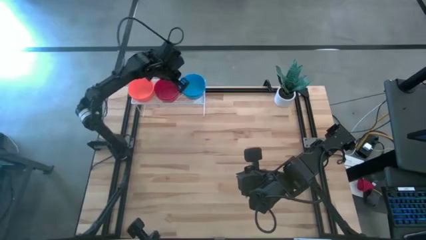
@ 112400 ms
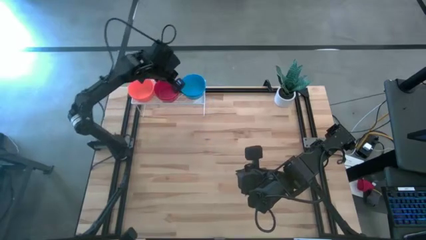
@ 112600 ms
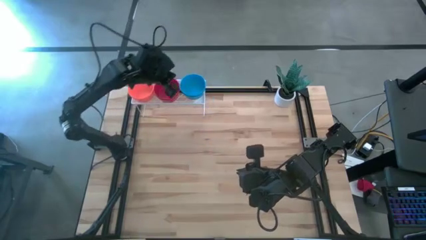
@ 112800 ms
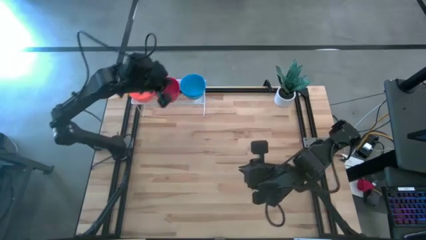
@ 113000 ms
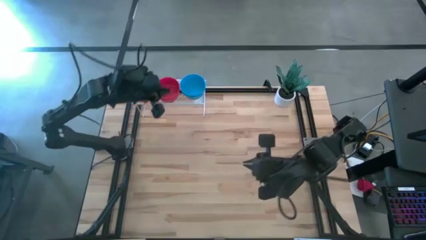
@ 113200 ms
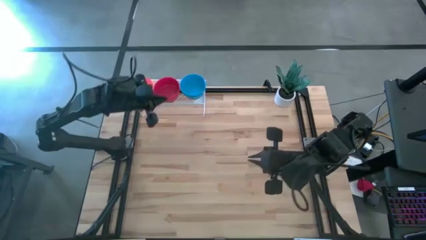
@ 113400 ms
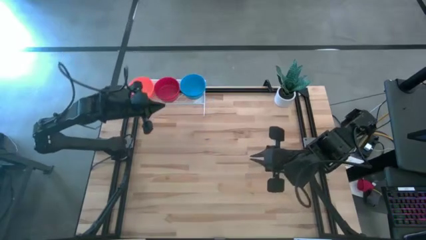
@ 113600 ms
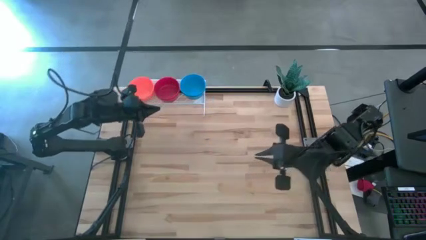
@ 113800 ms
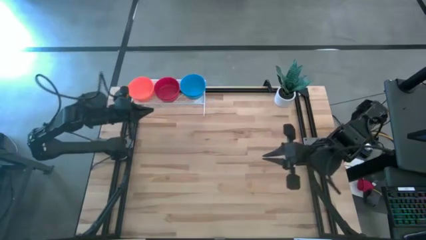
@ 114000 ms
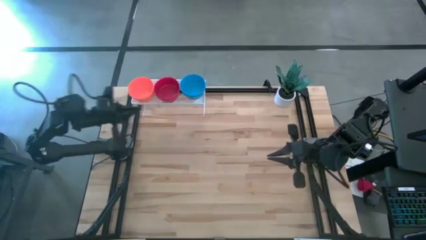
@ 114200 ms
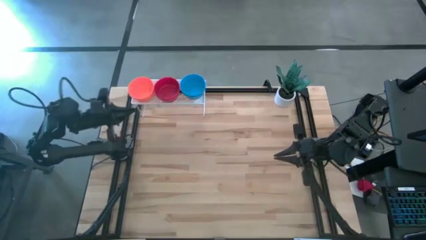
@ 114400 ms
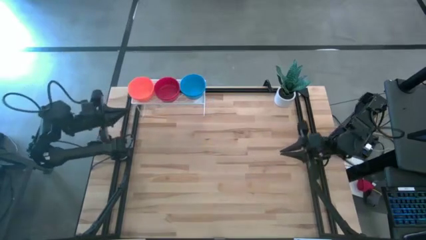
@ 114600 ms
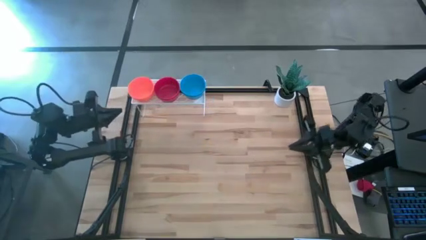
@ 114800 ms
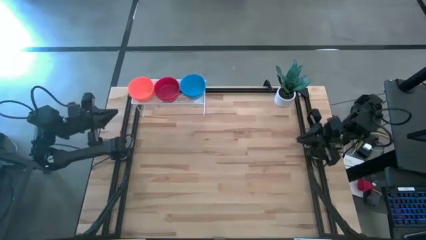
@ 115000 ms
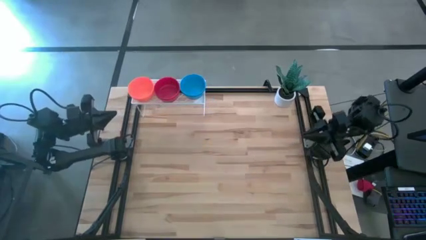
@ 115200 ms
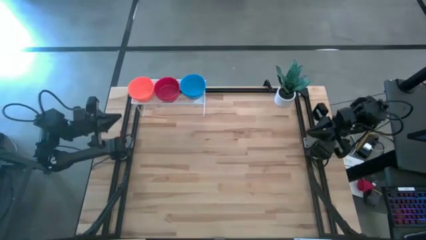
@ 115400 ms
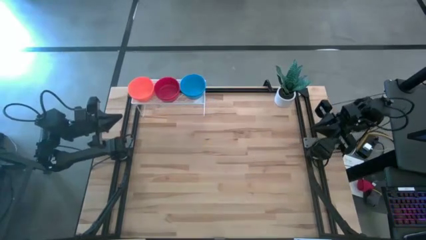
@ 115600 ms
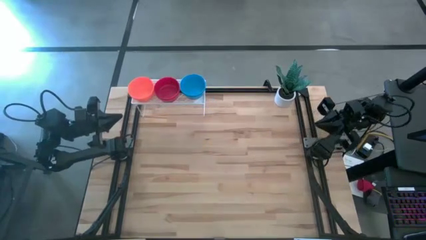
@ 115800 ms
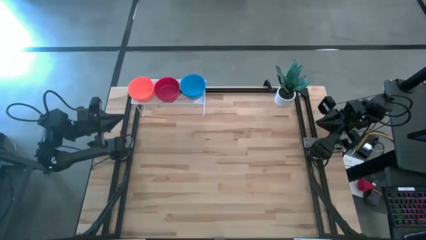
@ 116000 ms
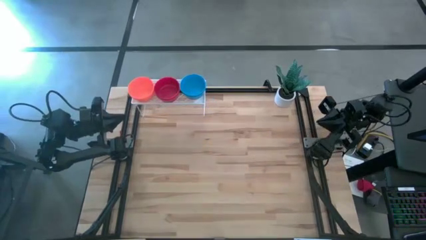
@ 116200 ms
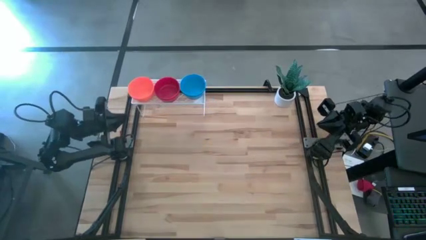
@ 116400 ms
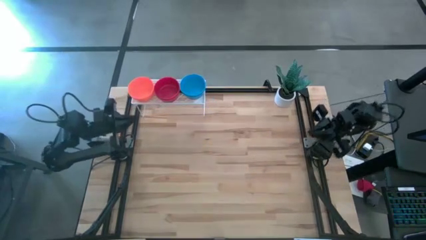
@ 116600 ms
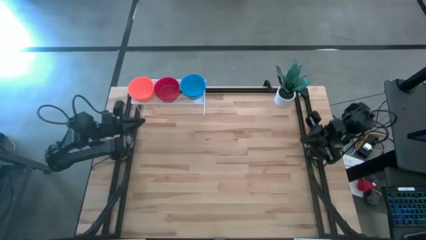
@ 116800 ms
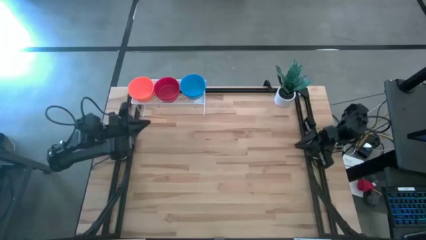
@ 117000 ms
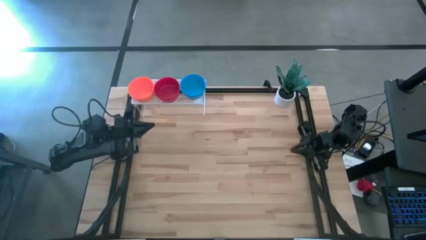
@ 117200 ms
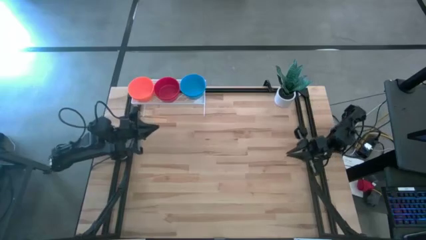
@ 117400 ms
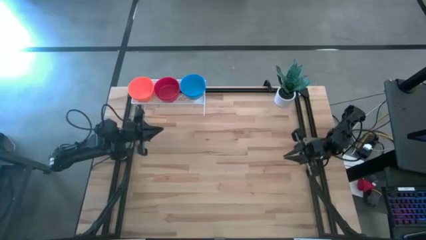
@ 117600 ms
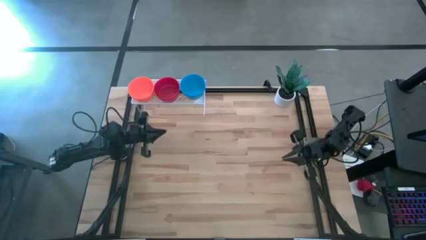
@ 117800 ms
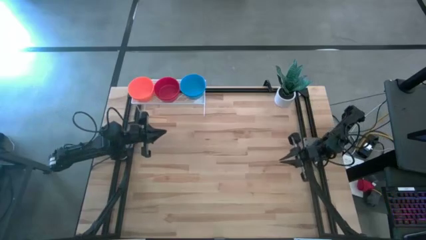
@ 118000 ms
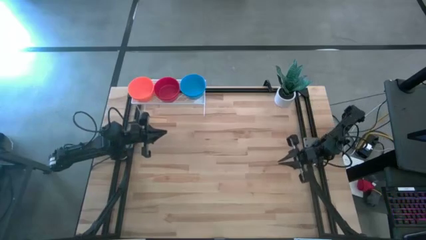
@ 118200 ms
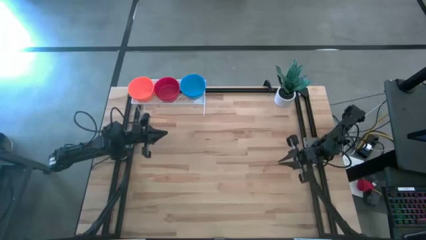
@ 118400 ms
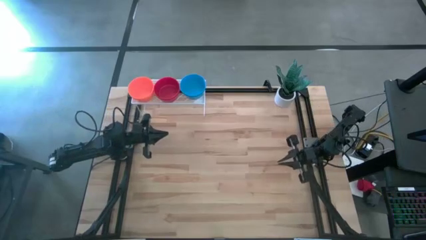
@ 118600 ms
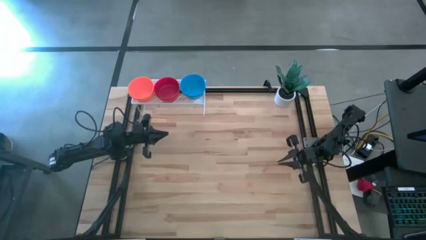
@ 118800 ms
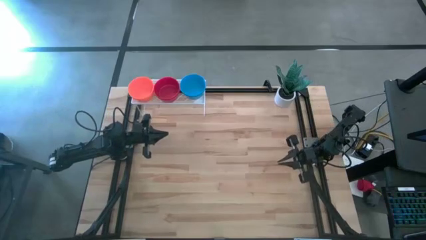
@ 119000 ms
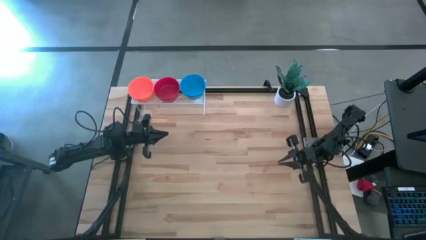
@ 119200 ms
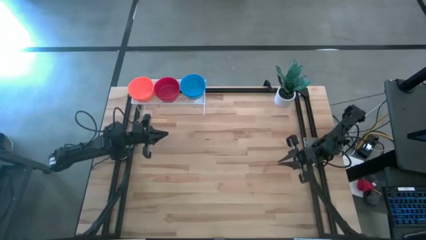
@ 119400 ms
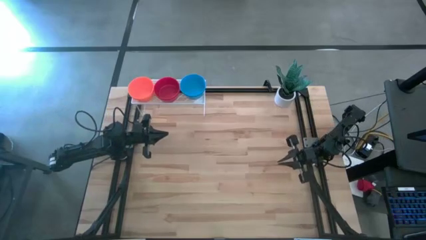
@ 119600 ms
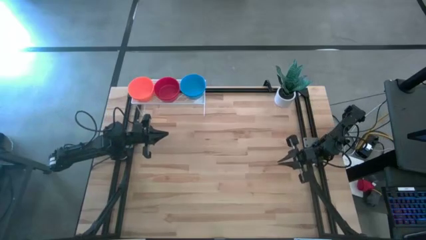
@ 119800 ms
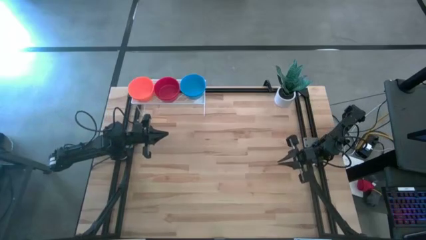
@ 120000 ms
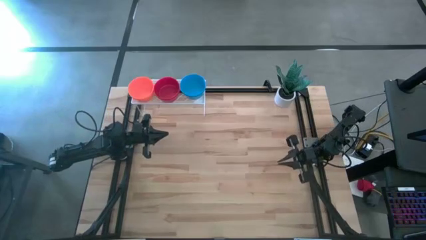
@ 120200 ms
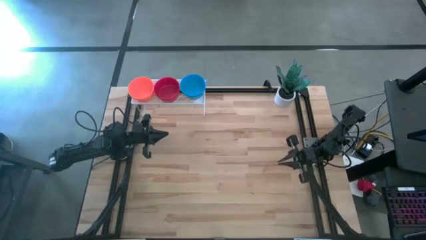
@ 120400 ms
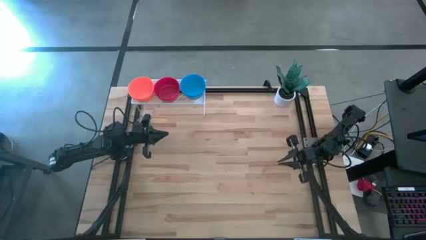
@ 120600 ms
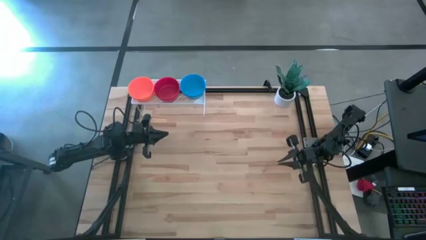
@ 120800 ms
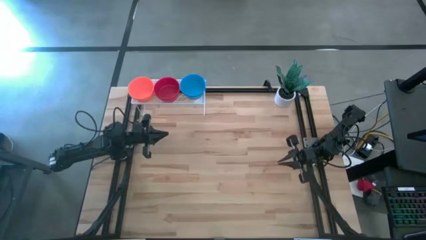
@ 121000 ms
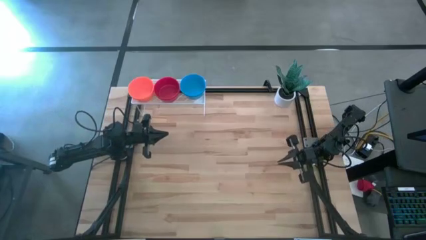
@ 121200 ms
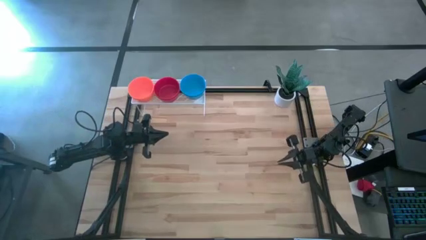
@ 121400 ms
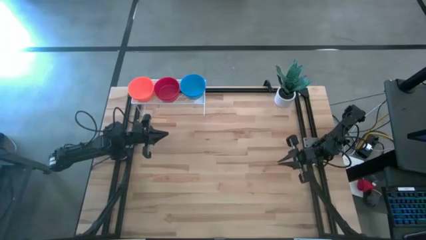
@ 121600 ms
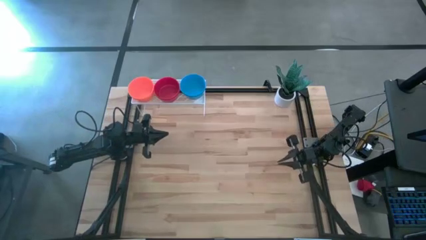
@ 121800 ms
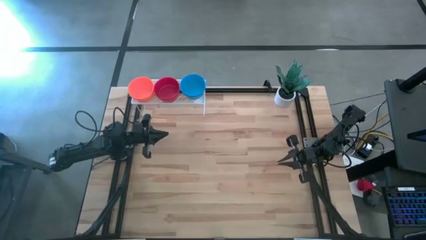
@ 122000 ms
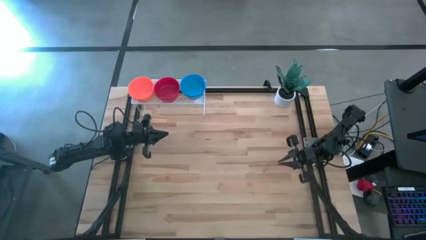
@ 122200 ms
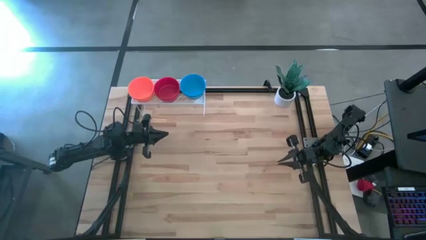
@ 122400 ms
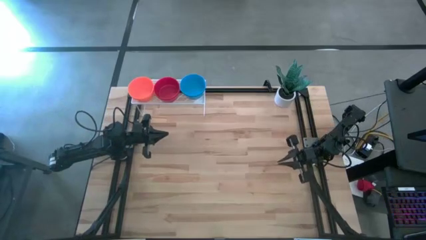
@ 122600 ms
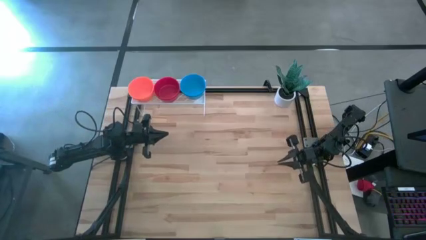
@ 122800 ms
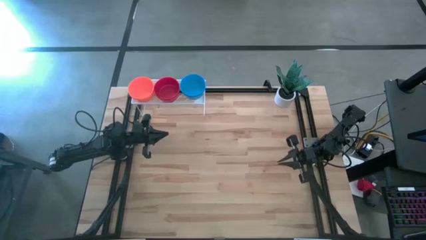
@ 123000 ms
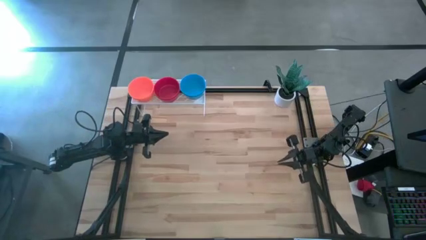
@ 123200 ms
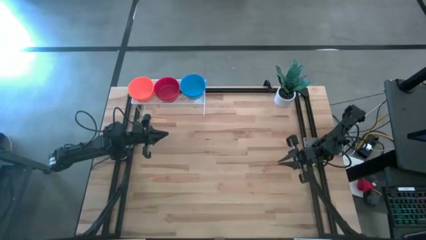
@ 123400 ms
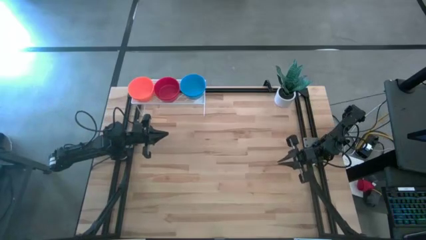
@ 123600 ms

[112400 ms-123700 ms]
Task: Pick & Place Mini bowls
Return to Home Position

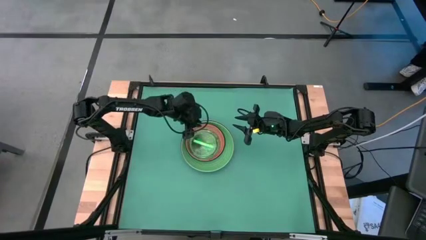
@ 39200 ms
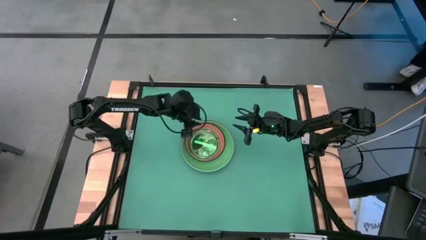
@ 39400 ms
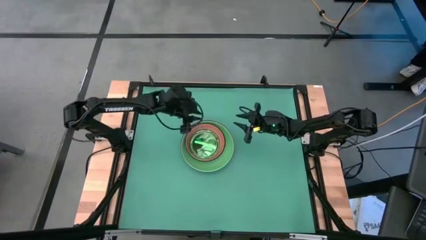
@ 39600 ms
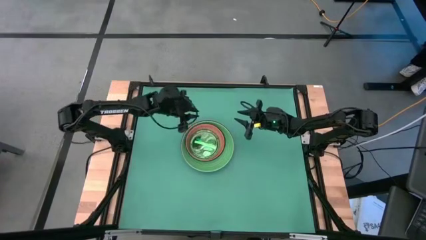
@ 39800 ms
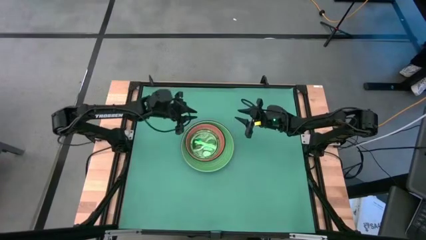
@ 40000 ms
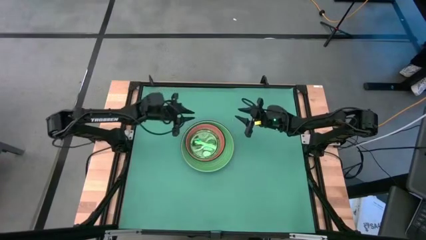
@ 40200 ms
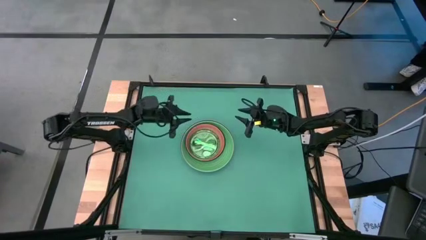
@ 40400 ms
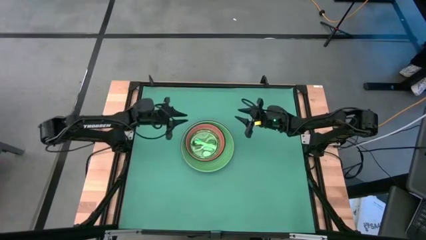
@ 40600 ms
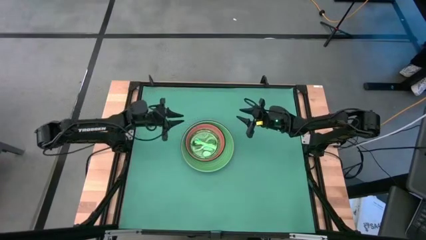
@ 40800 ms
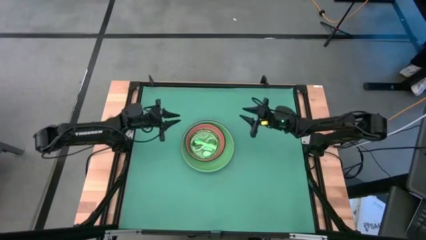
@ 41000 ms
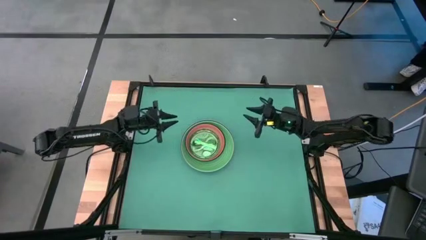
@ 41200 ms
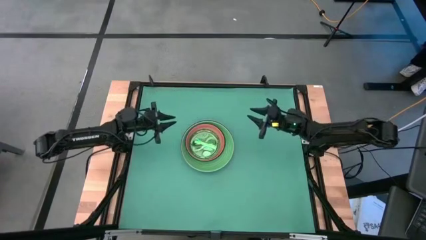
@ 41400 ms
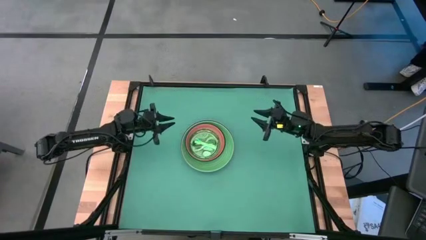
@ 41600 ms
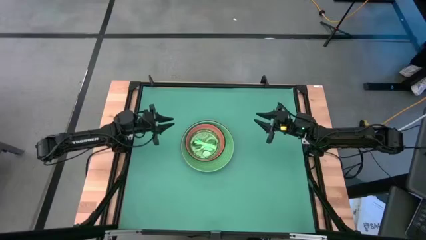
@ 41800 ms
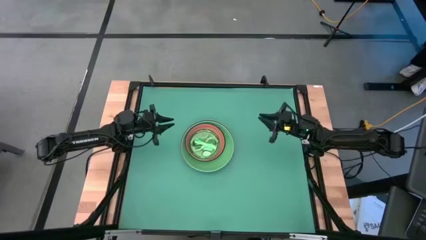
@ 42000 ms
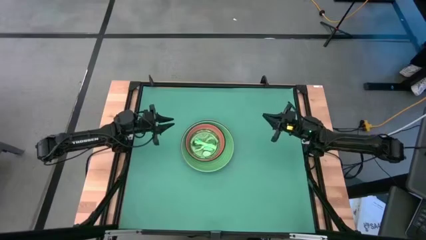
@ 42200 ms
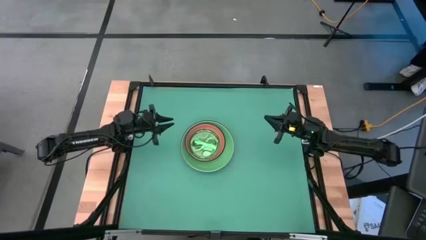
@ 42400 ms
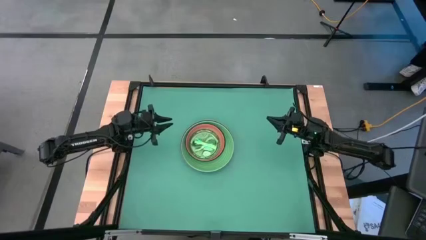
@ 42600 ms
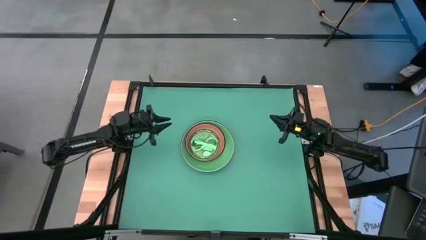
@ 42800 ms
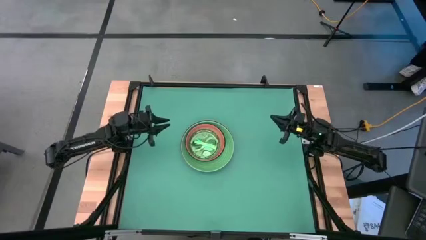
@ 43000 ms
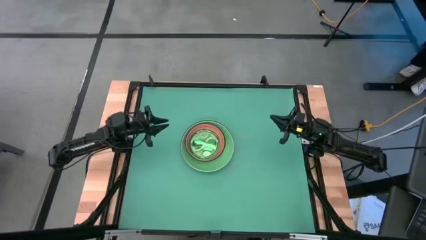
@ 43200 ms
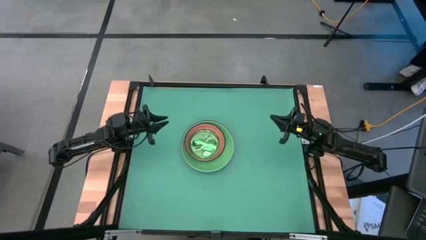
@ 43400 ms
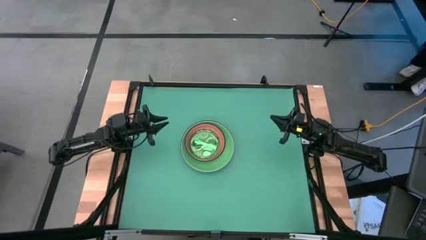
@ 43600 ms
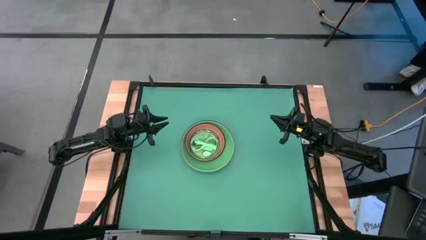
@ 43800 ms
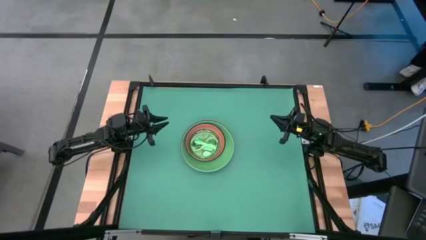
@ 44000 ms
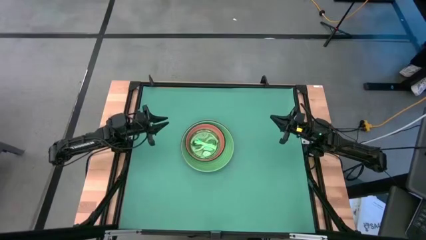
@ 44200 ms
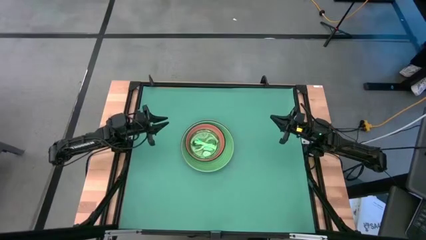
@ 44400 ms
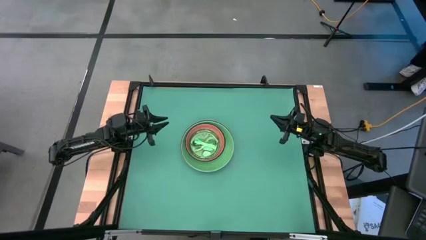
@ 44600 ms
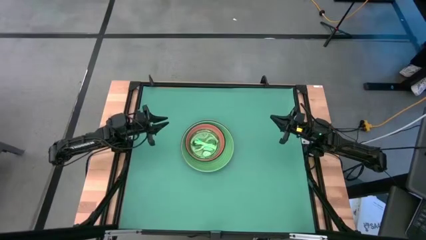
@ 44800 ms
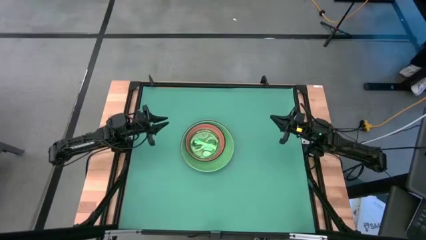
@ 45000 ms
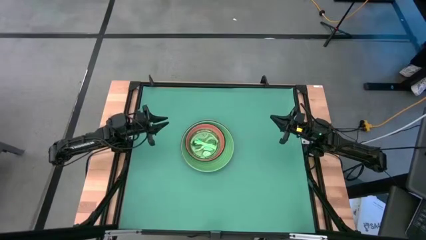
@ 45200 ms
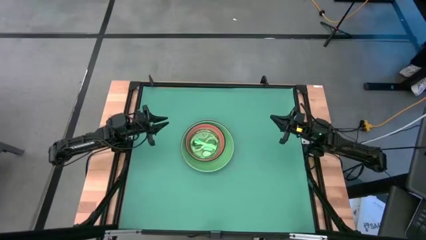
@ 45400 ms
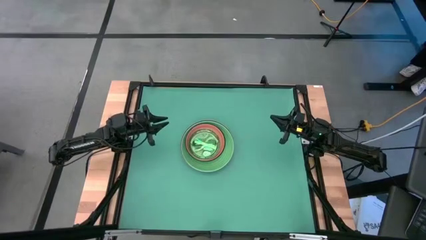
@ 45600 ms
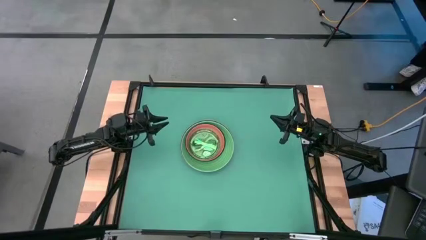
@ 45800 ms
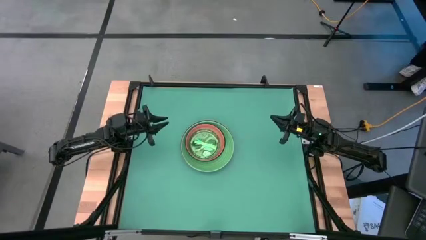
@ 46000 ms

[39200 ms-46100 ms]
Task: Stack plastic plates
Return to Home Position
